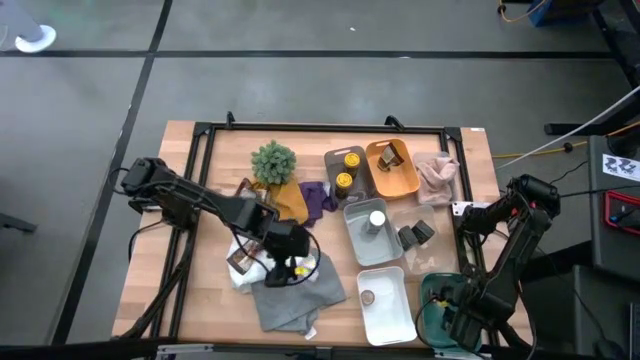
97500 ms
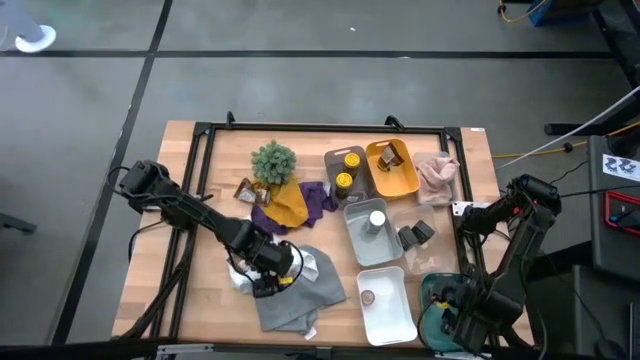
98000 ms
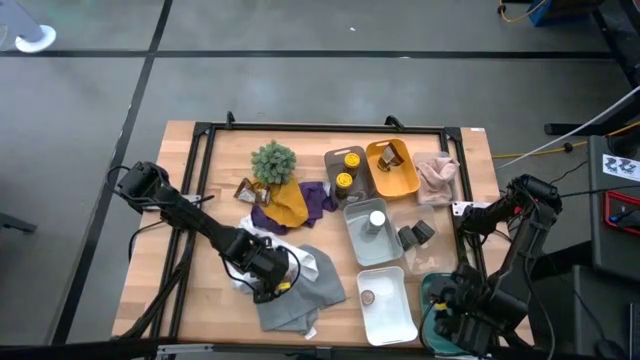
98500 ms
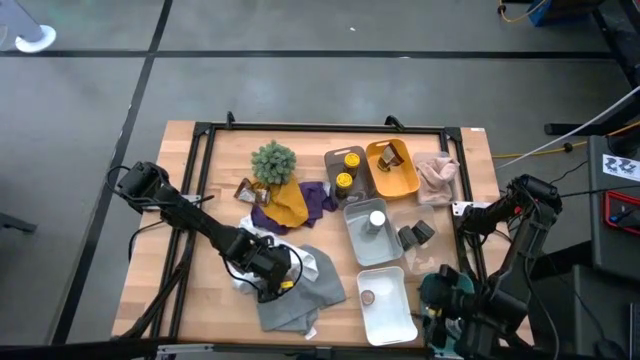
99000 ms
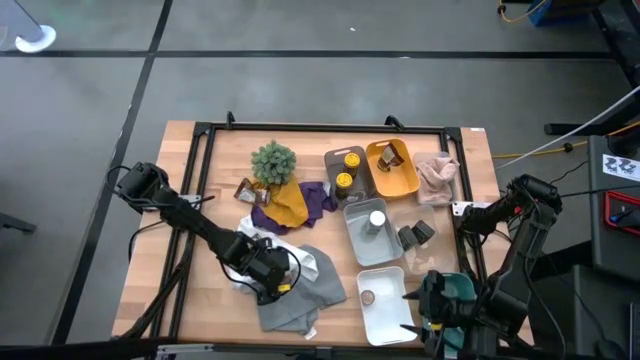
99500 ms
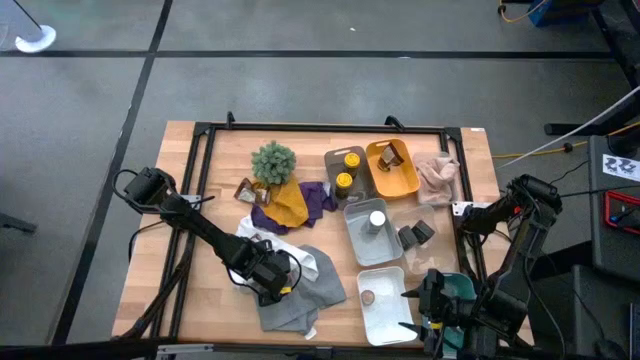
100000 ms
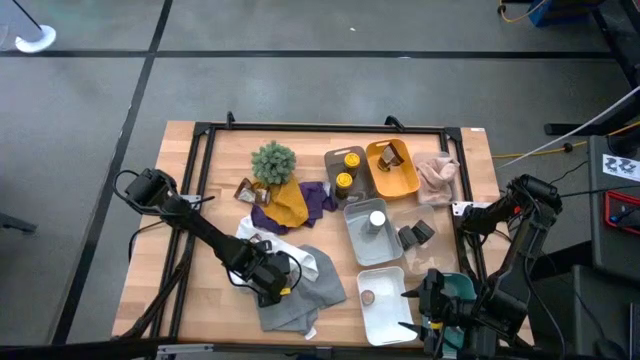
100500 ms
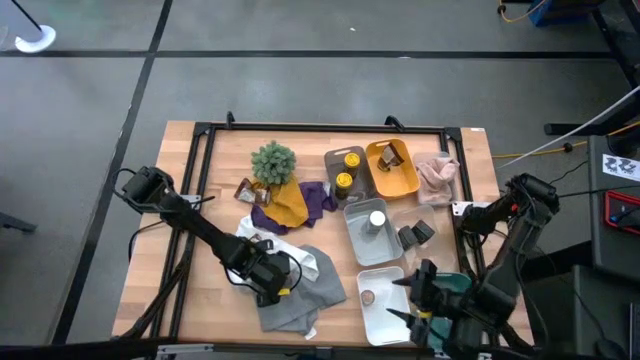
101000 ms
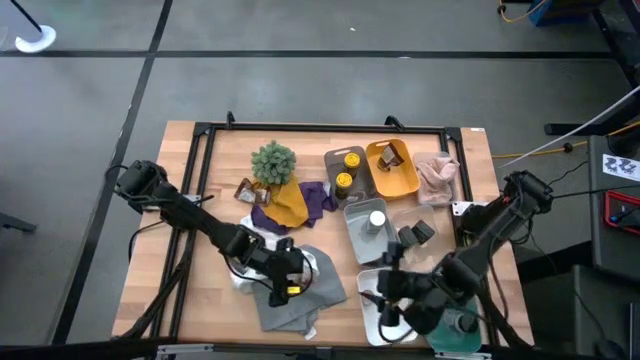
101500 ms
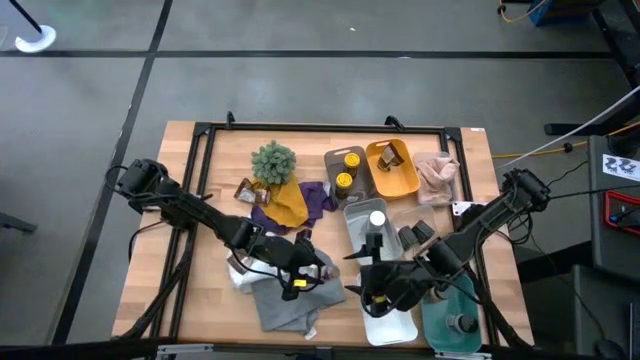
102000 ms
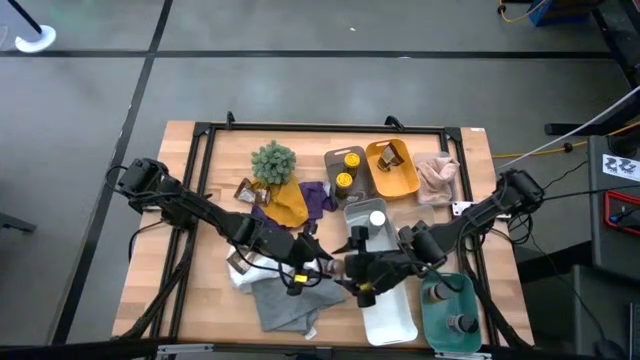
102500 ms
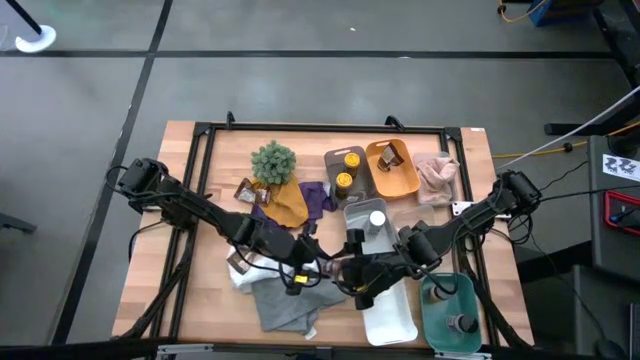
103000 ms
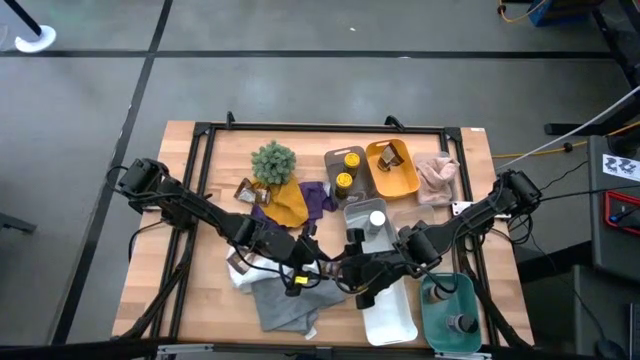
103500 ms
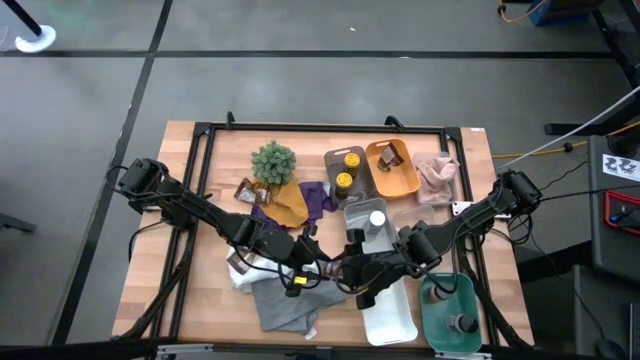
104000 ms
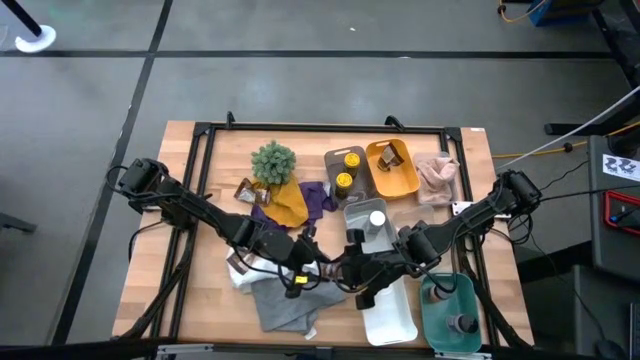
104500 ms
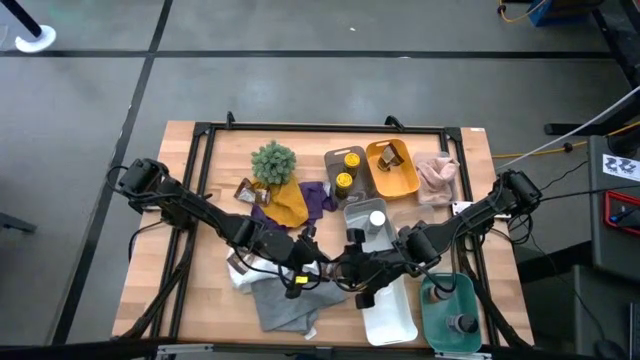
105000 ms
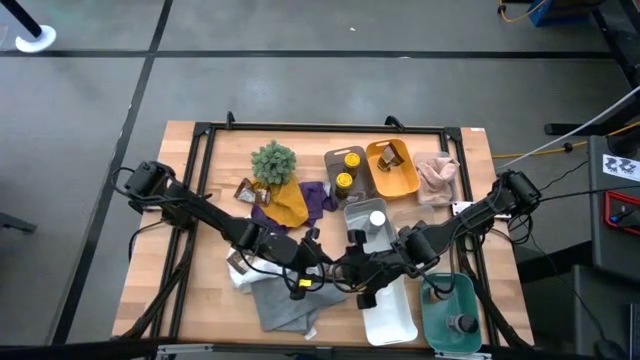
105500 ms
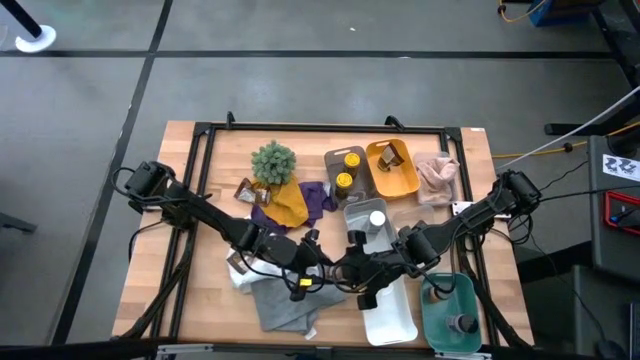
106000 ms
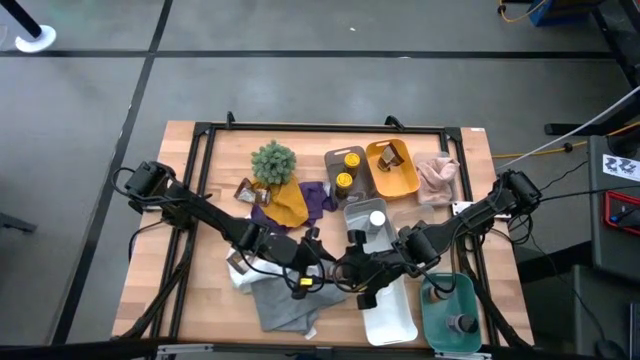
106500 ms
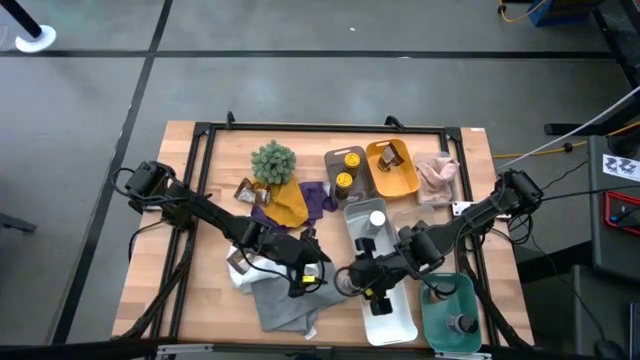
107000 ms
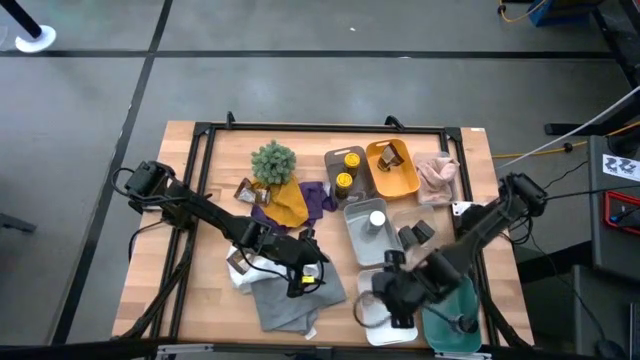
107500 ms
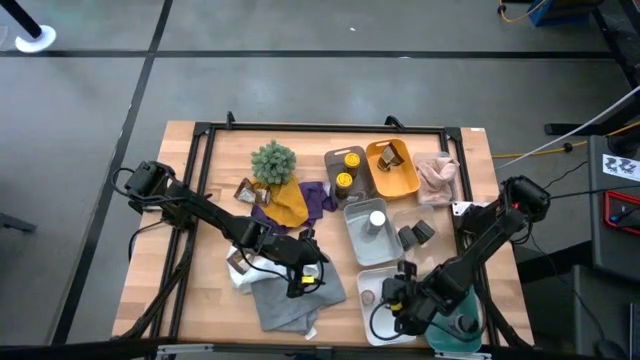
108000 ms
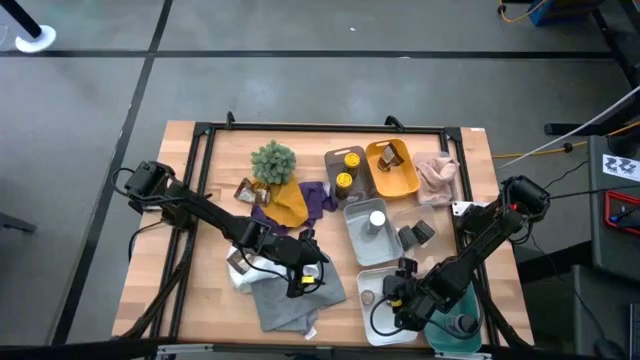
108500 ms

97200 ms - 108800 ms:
Task: Sort spices by type
Put the brown seasoning bottle into the white bin

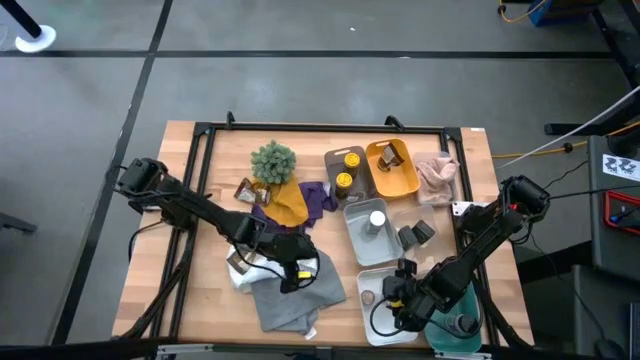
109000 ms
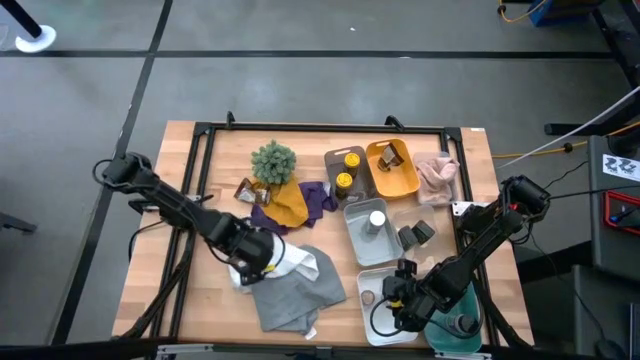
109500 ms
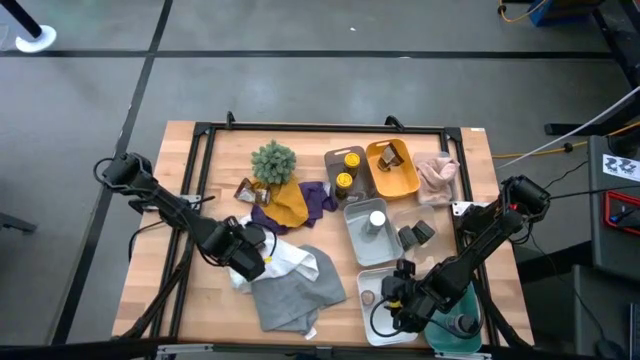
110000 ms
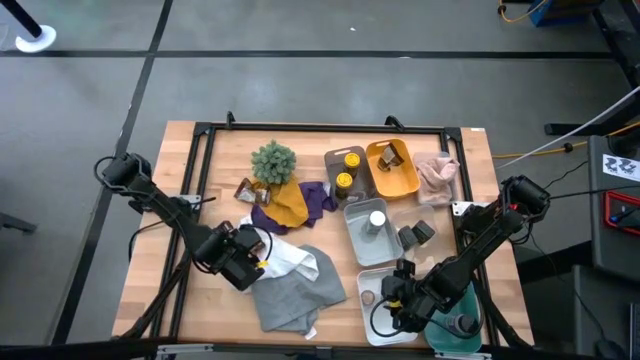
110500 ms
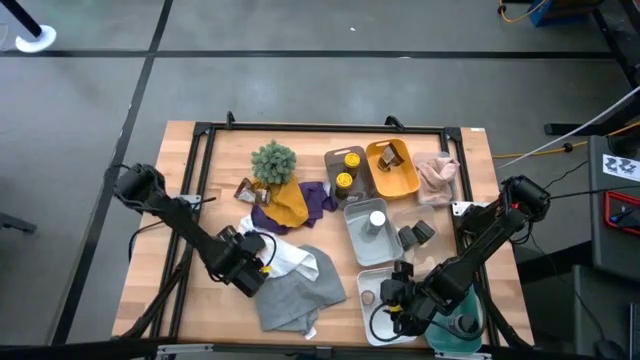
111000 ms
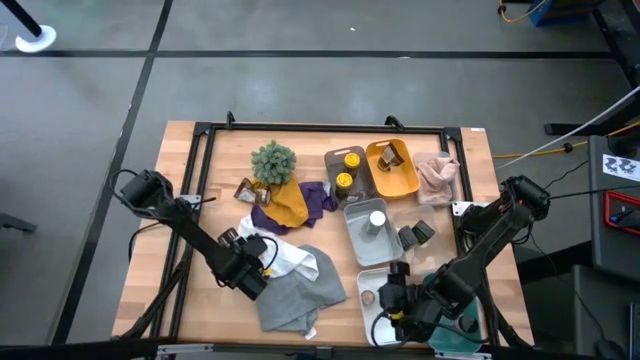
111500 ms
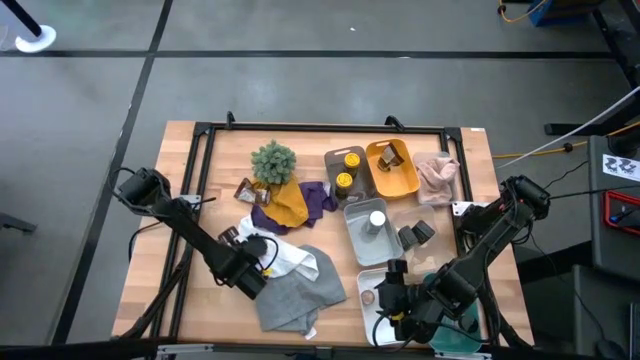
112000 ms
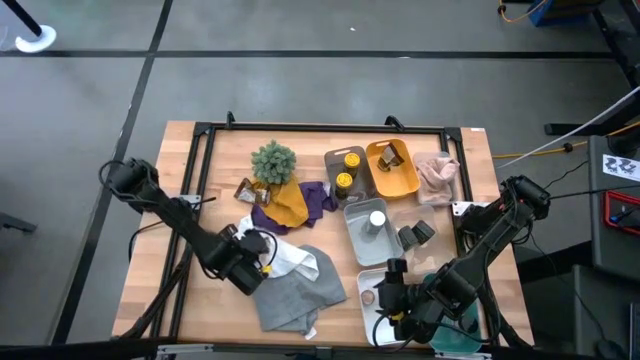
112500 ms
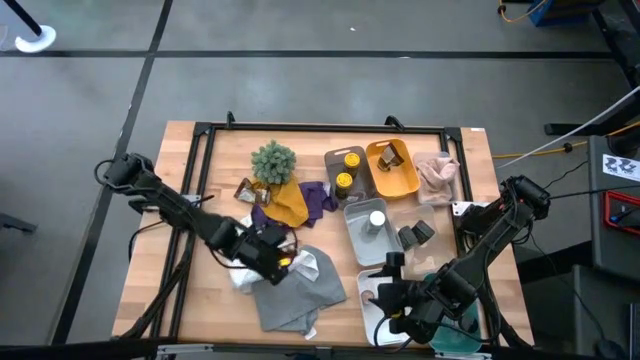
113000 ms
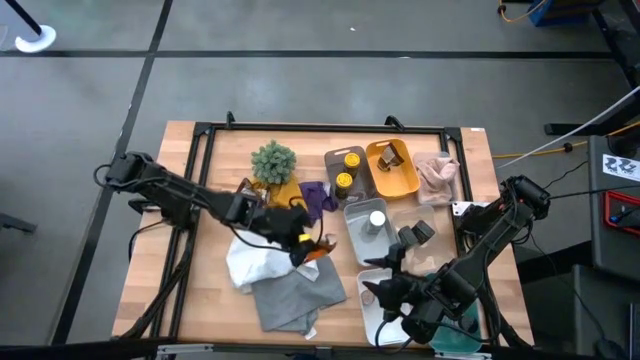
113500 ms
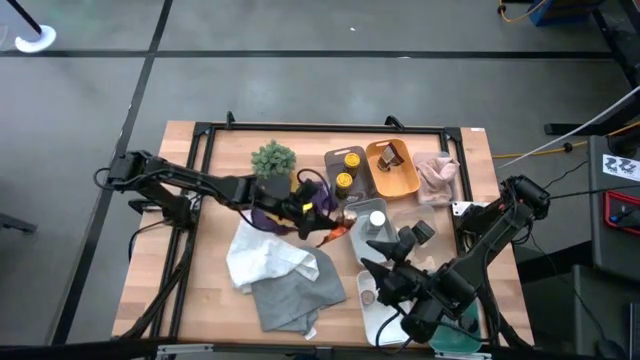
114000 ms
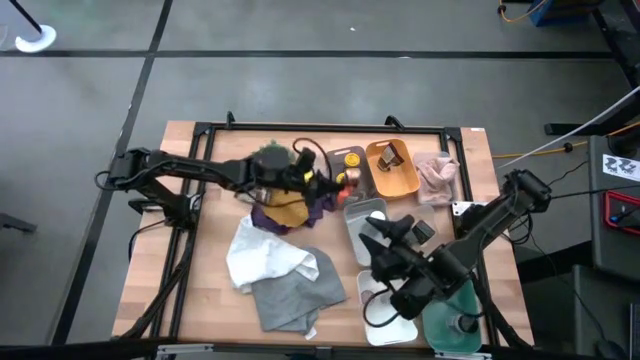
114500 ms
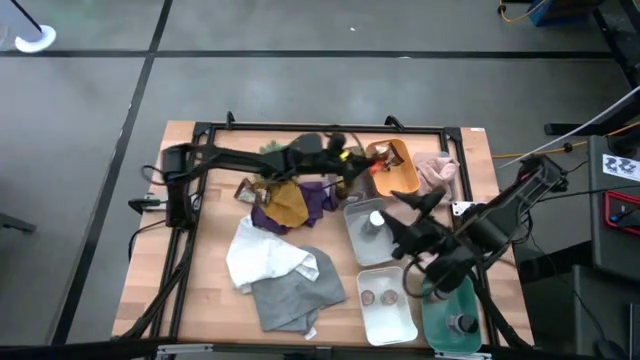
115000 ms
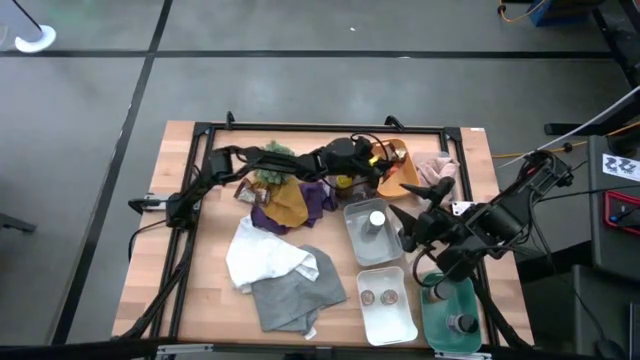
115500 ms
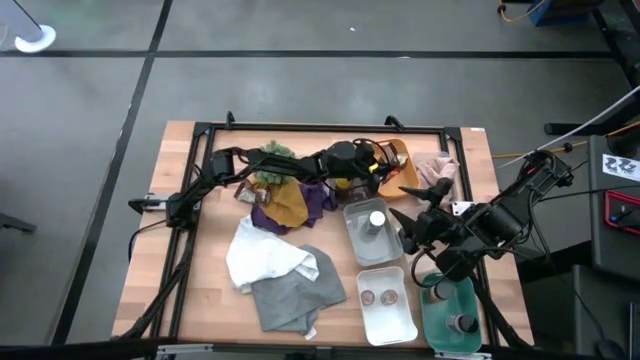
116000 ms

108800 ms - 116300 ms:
Put the bottom orange seasoning pack into the yellow bin

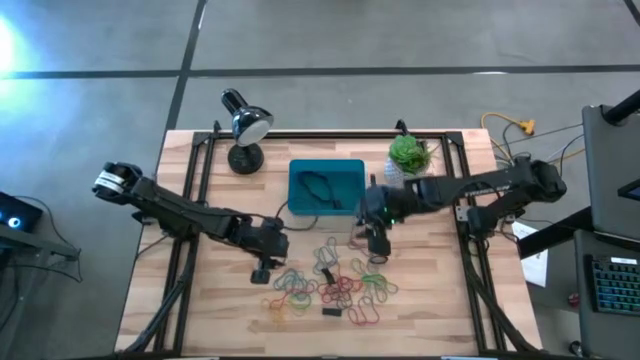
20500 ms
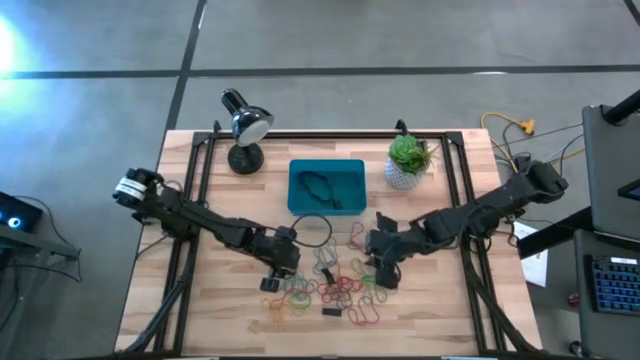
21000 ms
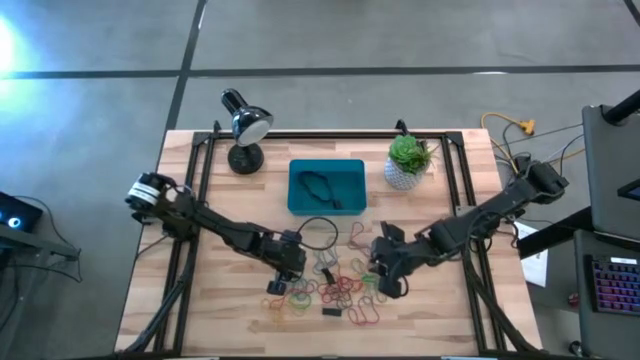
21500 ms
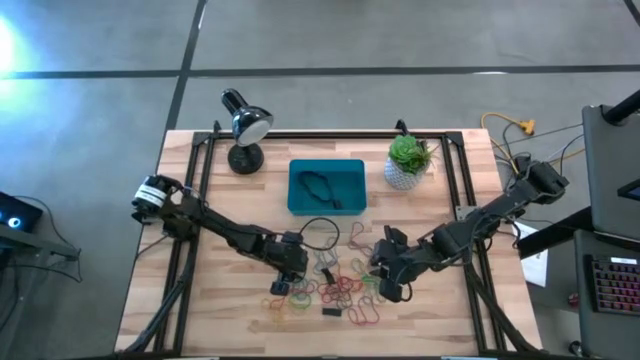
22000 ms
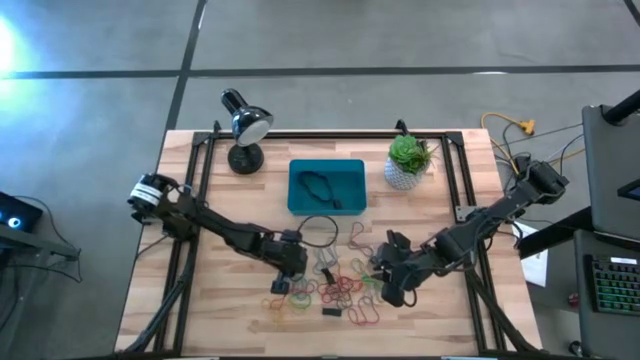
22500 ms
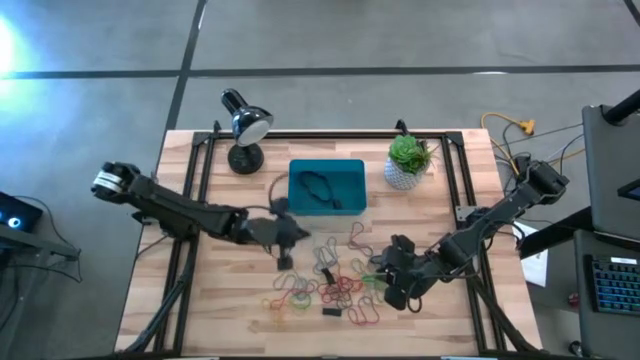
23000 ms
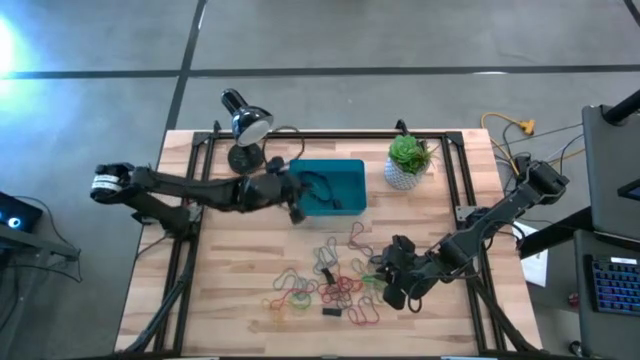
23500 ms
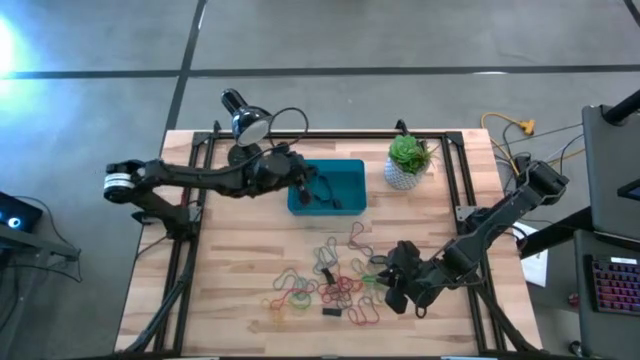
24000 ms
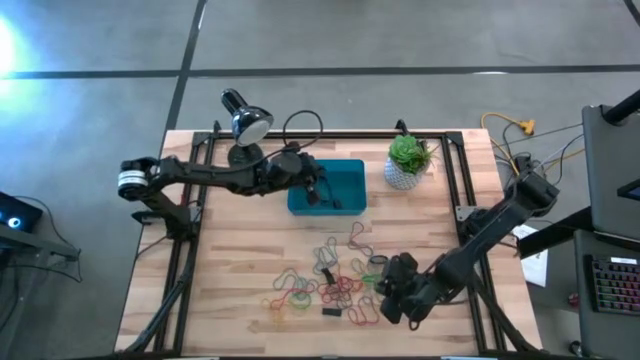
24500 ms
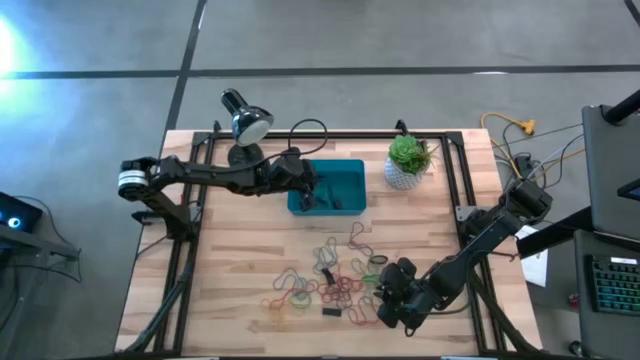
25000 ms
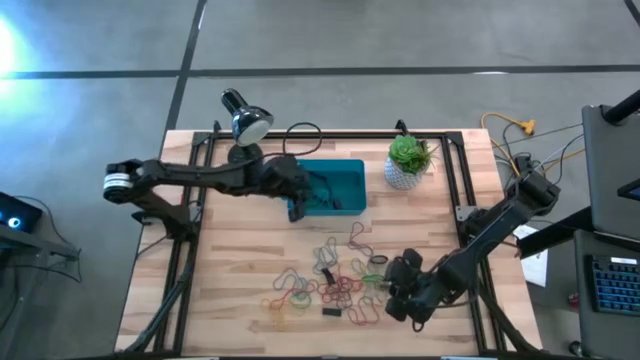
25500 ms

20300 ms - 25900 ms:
Task: Pick and place rubber bands into bin
Put the blue rubber band into the dark blue bin
